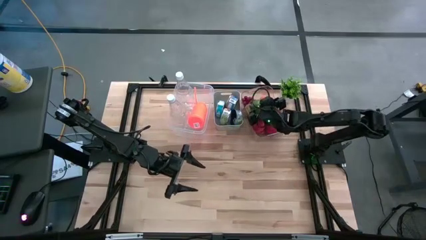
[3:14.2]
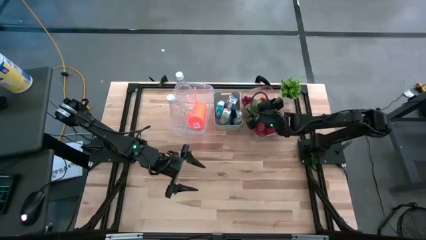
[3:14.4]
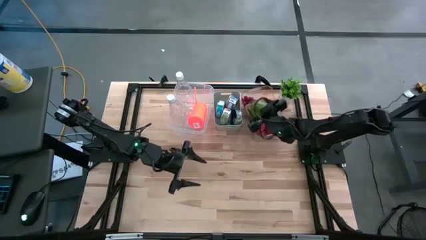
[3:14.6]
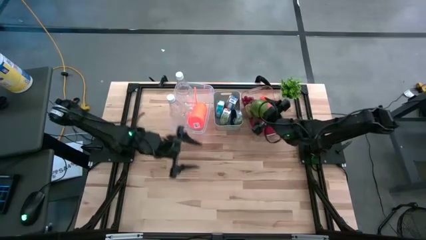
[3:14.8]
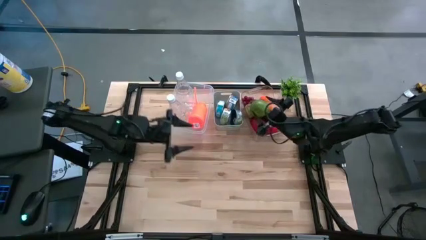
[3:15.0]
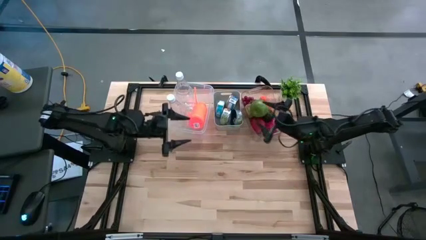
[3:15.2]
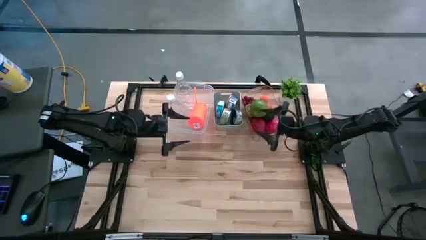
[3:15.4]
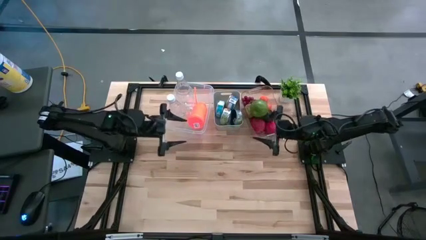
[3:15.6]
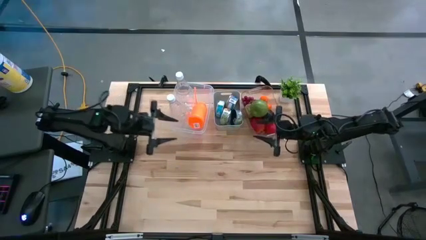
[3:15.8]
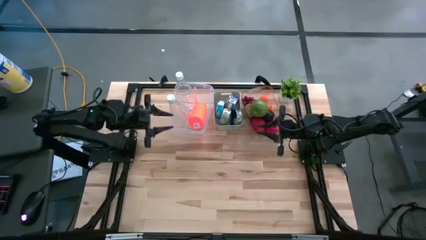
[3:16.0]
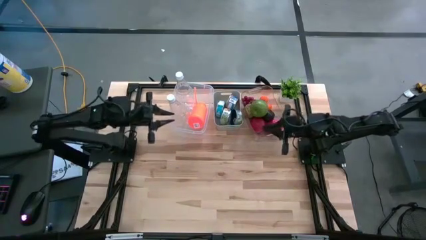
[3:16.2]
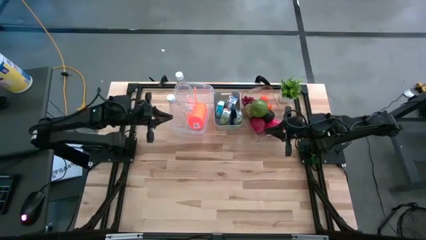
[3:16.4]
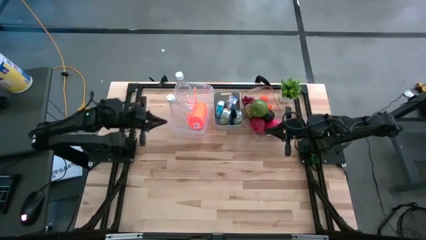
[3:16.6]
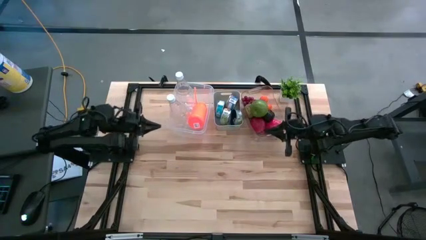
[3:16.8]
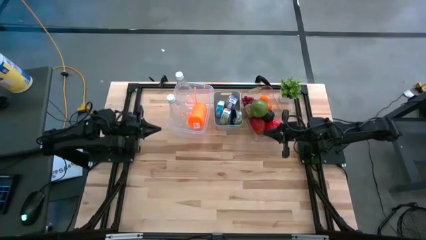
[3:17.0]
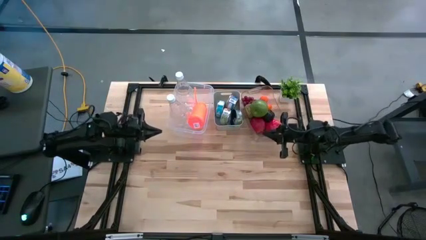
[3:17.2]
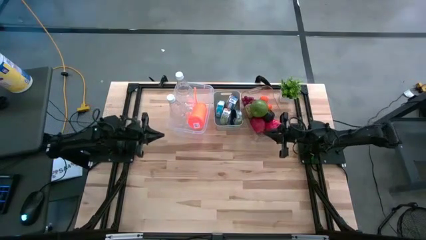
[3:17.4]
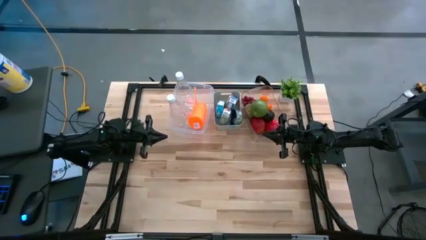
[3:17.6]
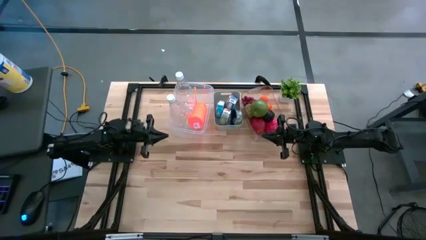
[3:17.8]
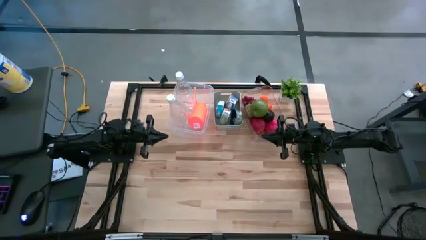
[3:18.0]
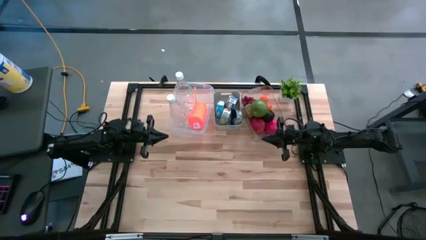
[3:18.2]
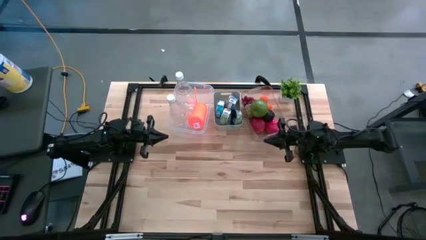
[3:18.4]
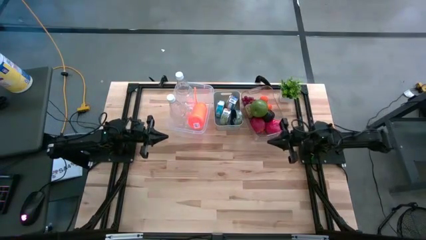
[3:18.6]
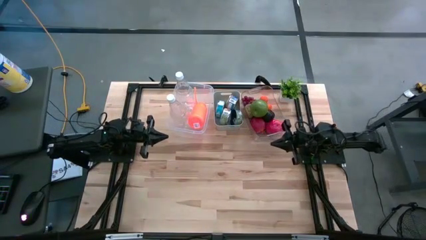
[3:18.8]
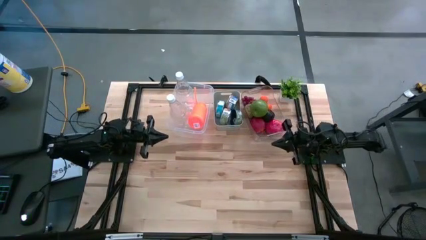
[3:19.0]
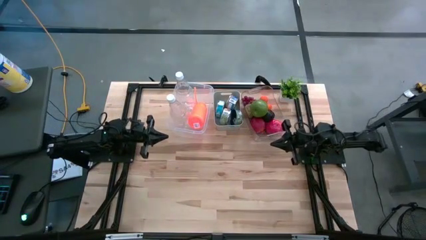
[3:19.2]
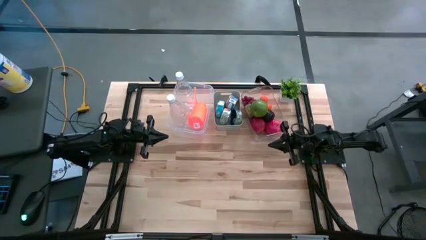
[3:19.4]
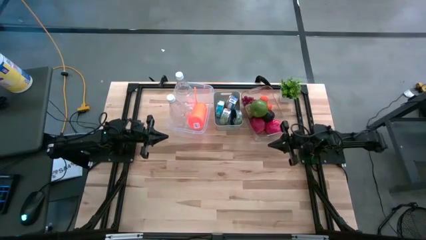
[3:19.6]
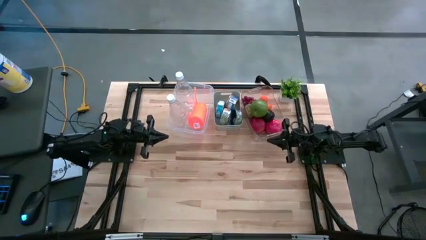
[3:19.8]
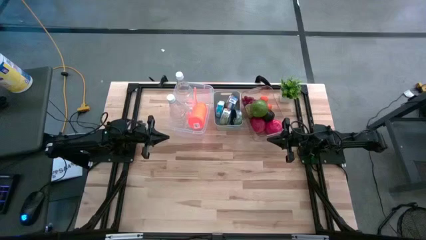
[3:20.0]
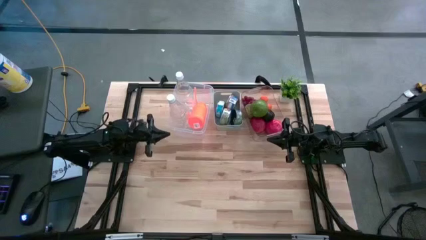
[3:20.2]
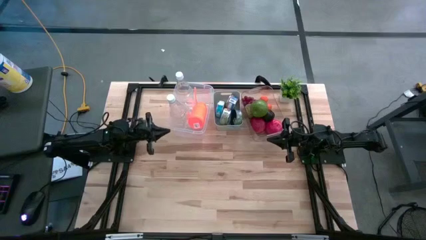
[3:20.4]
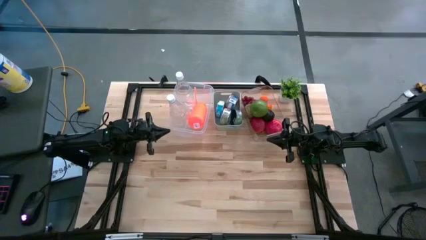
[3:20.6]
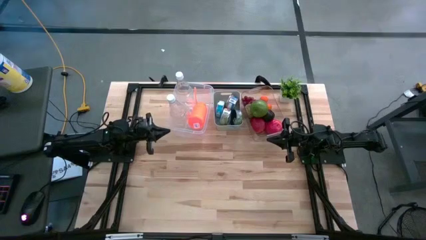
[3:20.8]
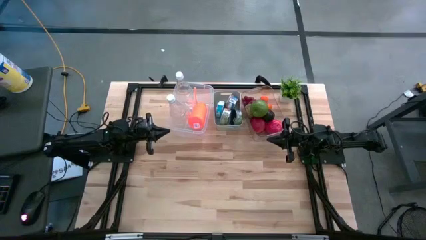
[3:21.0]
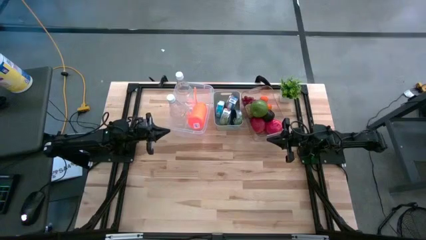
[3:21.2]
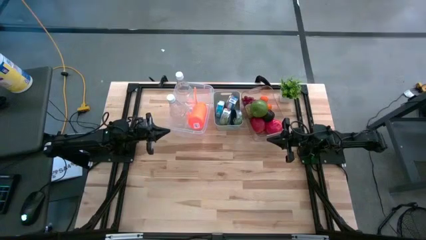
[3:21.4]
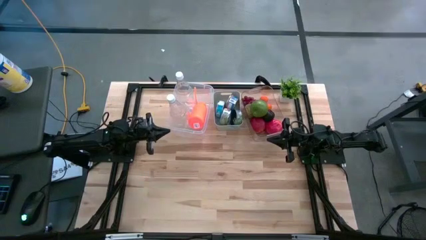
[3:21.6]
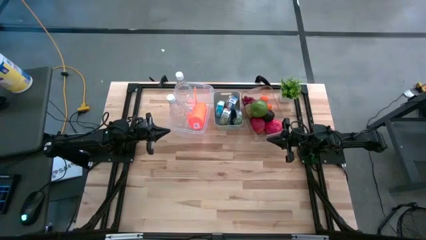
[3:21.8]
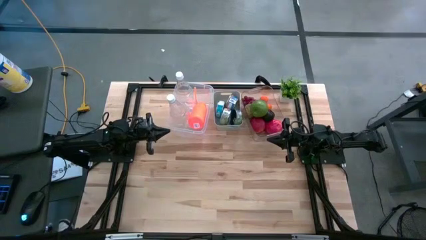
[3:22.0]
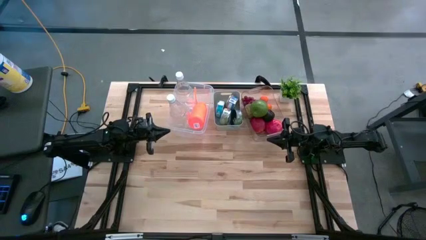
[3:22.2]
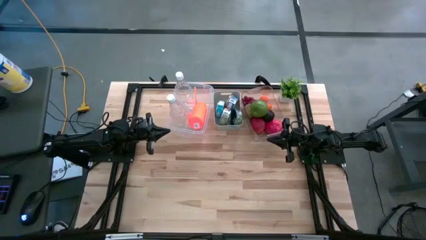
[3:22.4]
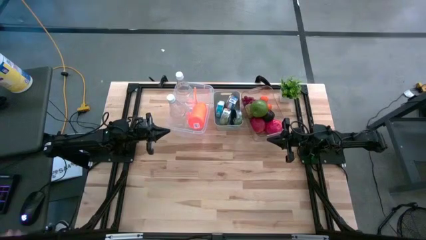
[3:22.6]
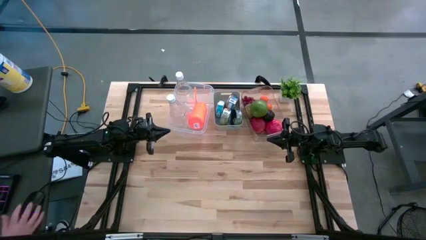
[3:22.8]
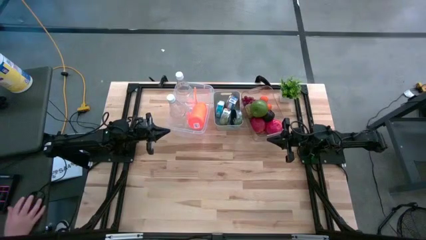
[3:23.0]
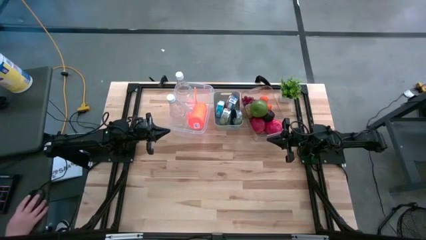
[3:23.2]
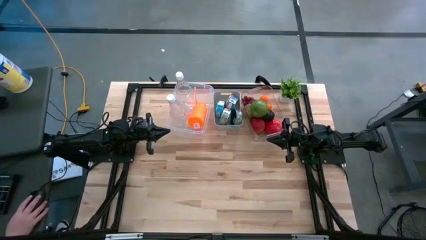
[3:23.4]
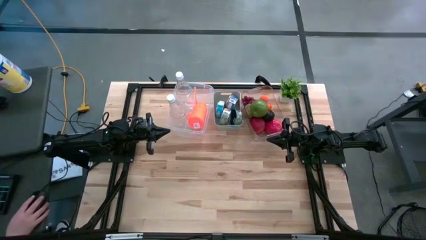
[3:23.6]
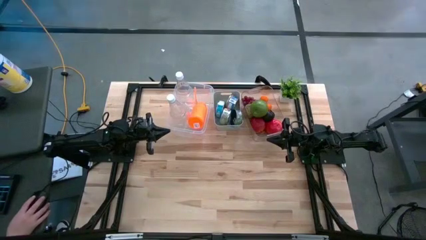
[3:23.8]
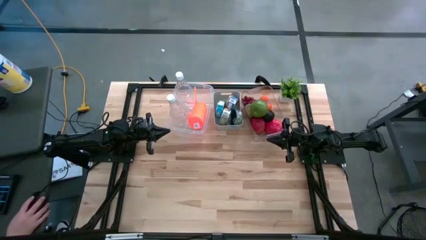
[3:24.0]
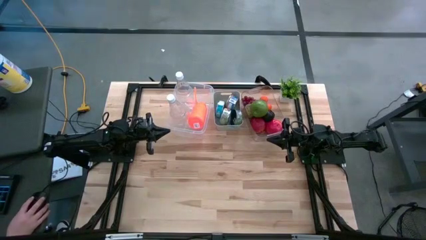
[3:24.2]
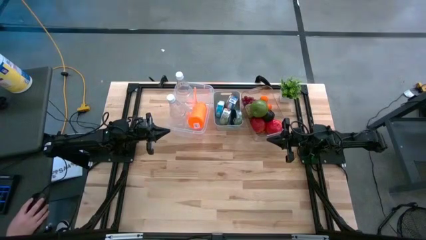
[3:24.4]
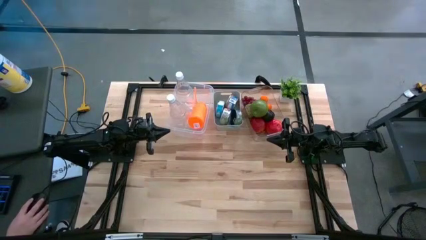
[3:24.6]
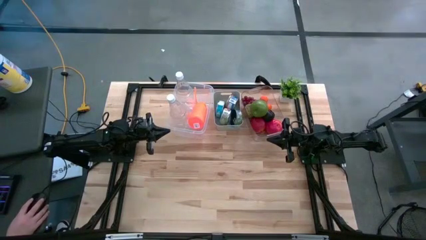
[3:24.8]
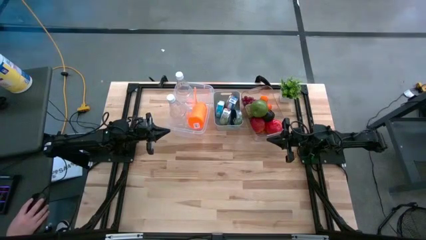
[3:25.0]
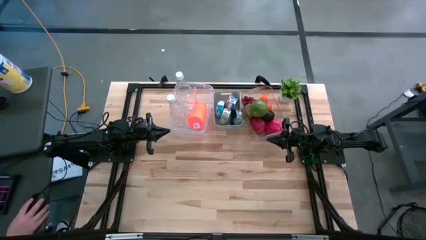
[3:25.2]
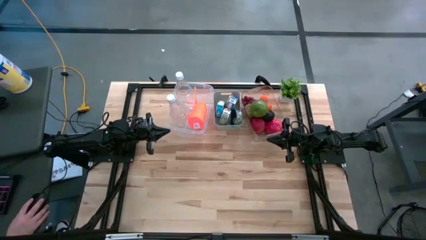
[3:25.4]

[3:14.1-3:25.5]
Task: Pick & Place Food Item
Return to Home Position
